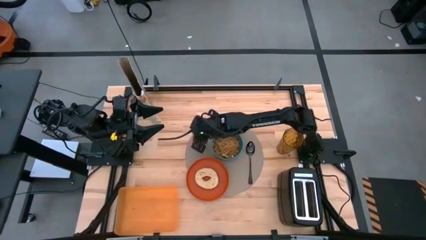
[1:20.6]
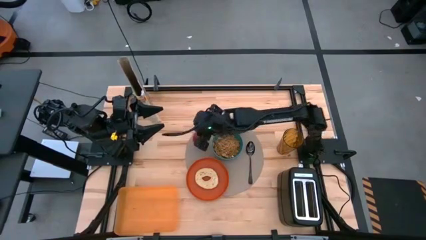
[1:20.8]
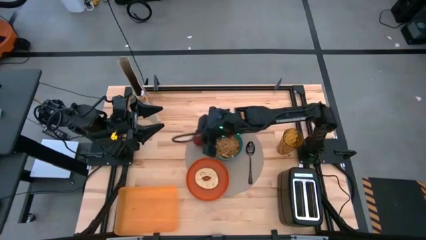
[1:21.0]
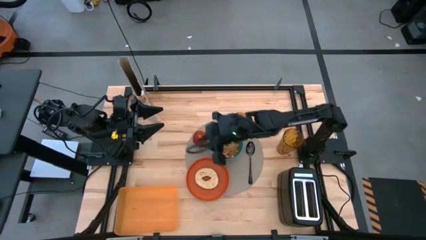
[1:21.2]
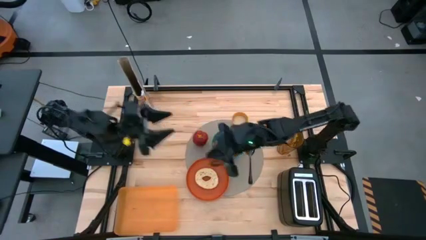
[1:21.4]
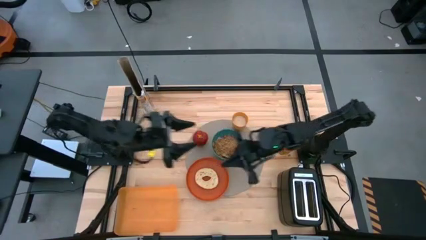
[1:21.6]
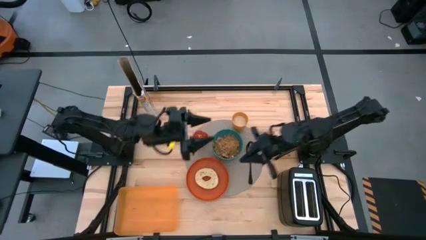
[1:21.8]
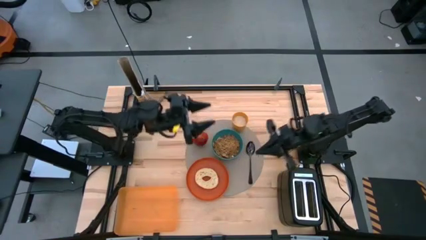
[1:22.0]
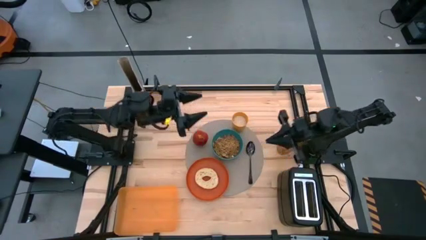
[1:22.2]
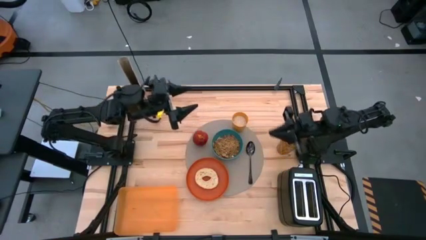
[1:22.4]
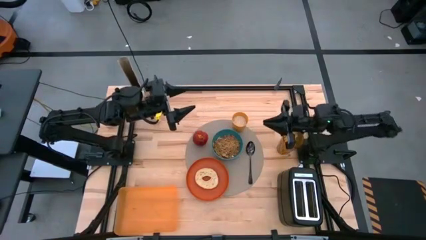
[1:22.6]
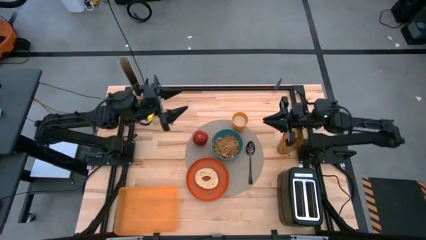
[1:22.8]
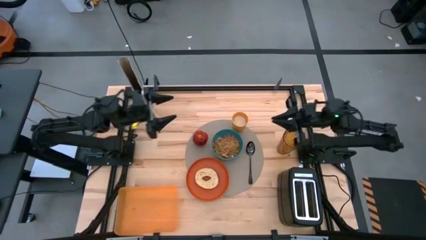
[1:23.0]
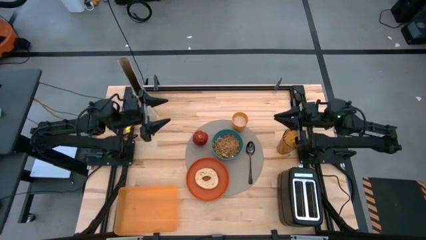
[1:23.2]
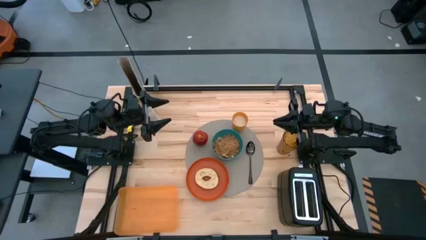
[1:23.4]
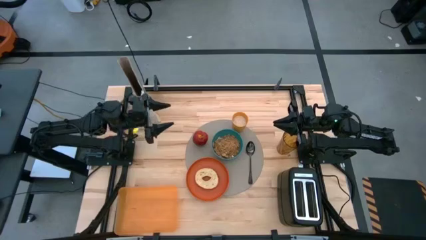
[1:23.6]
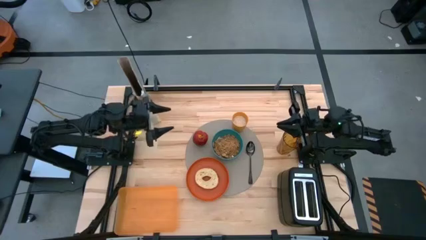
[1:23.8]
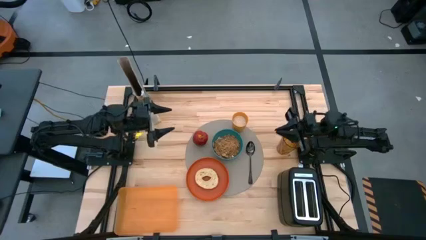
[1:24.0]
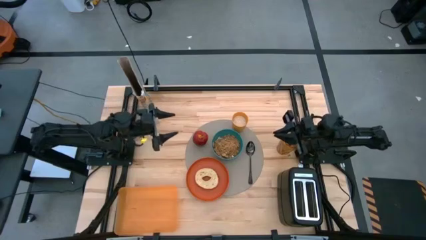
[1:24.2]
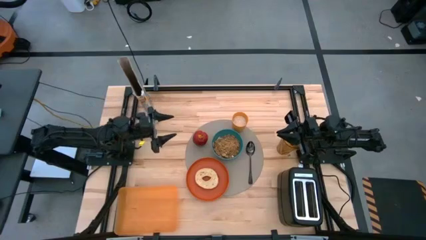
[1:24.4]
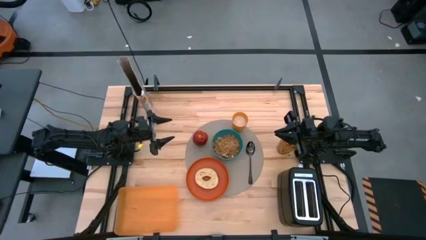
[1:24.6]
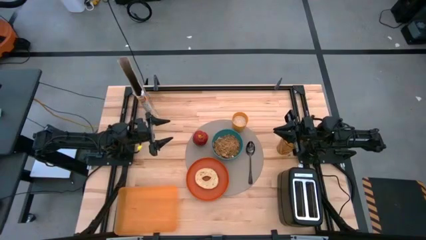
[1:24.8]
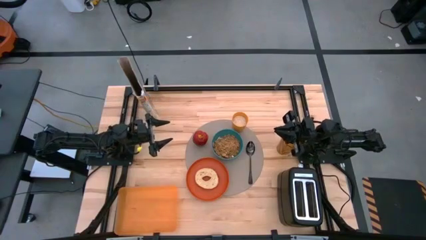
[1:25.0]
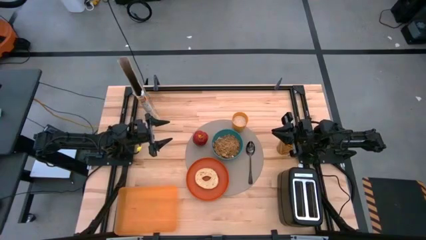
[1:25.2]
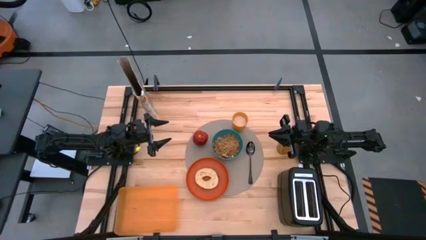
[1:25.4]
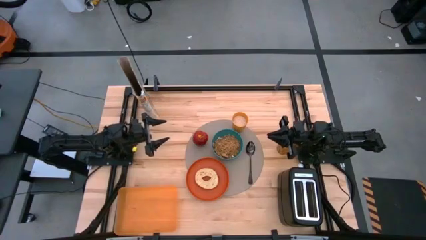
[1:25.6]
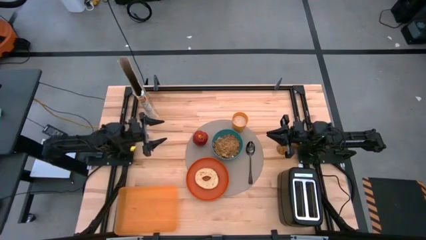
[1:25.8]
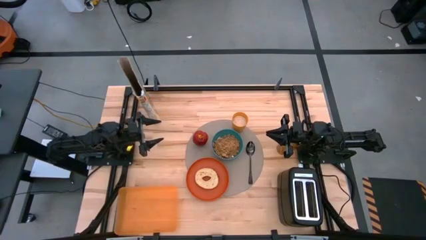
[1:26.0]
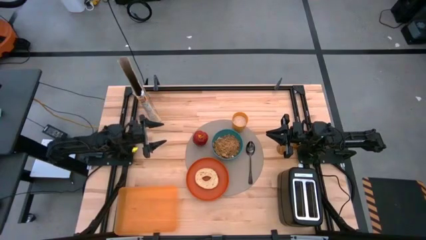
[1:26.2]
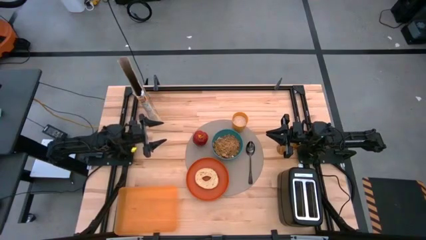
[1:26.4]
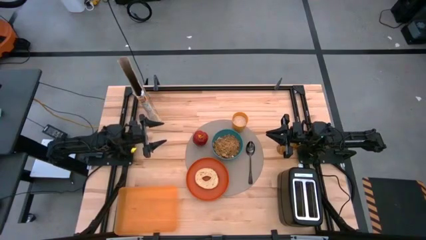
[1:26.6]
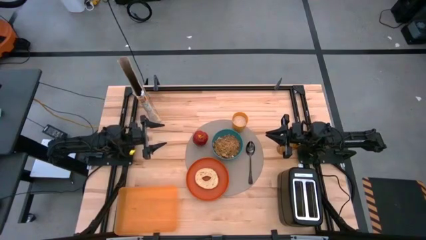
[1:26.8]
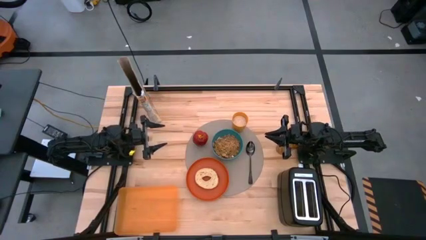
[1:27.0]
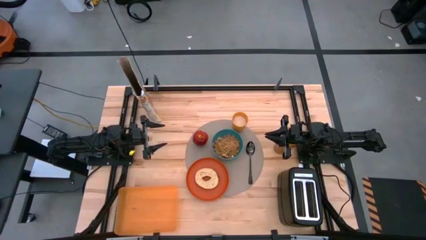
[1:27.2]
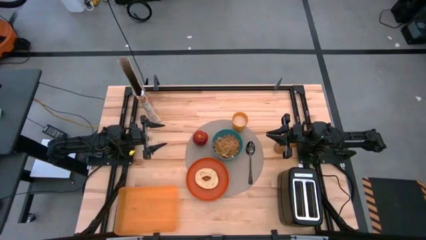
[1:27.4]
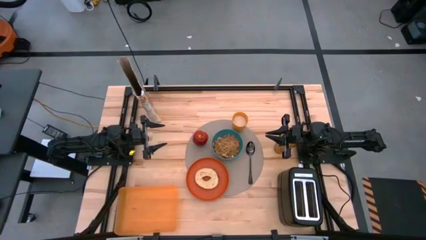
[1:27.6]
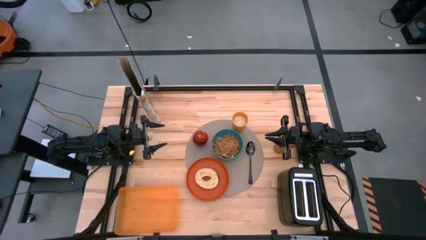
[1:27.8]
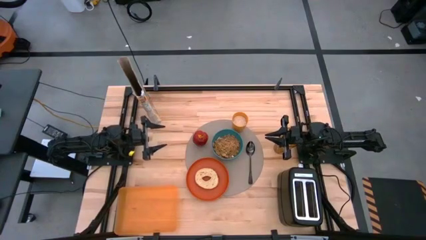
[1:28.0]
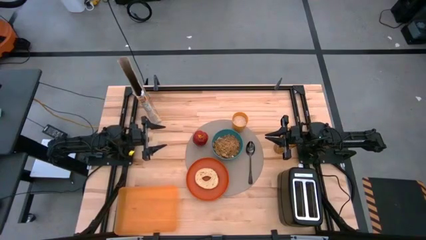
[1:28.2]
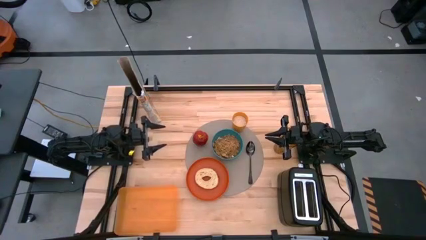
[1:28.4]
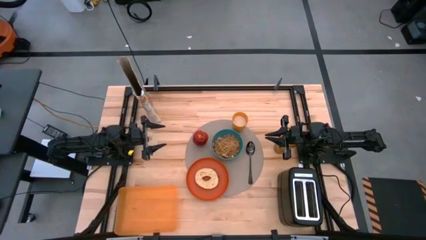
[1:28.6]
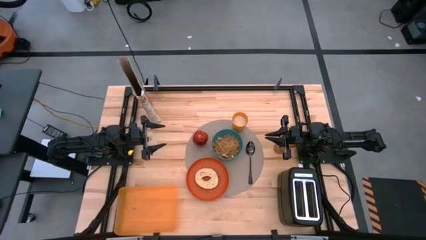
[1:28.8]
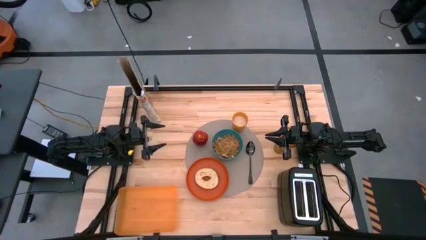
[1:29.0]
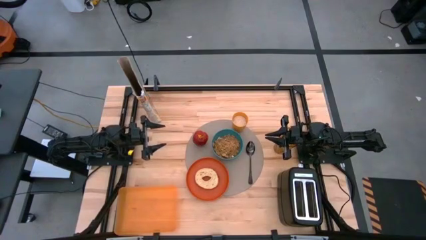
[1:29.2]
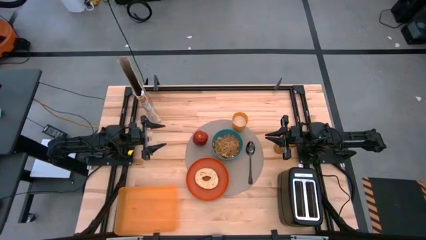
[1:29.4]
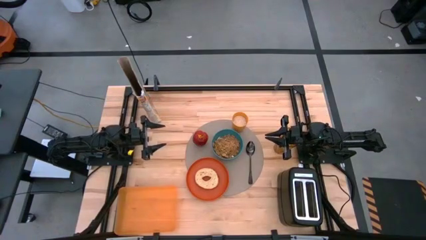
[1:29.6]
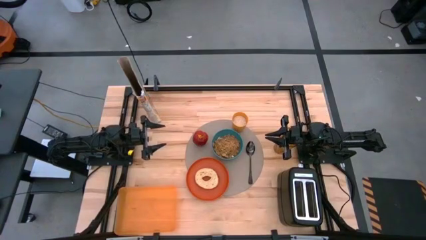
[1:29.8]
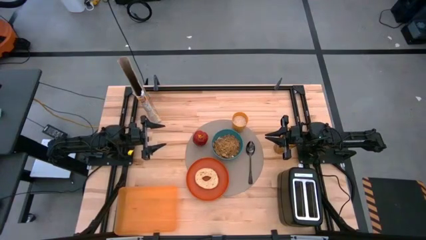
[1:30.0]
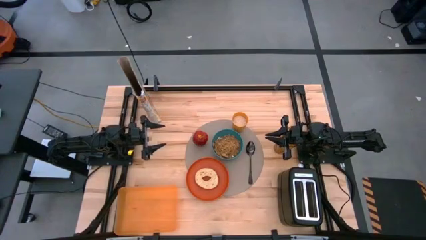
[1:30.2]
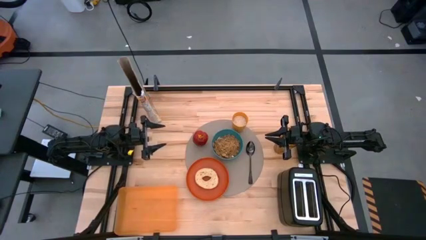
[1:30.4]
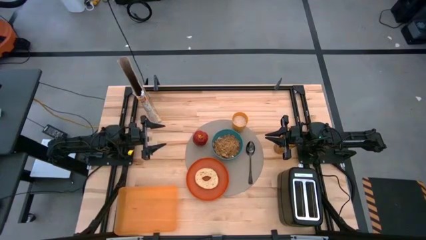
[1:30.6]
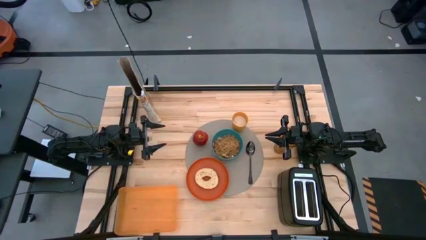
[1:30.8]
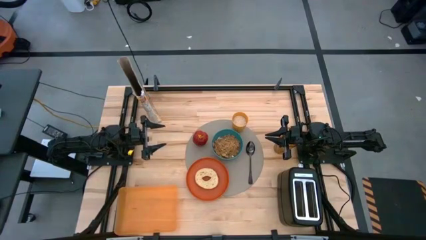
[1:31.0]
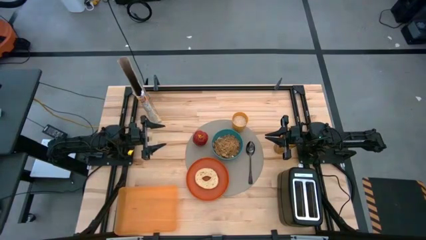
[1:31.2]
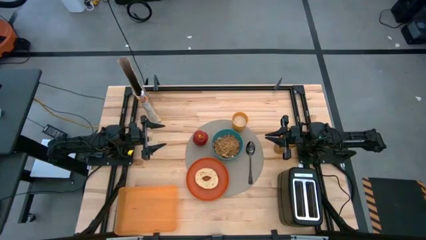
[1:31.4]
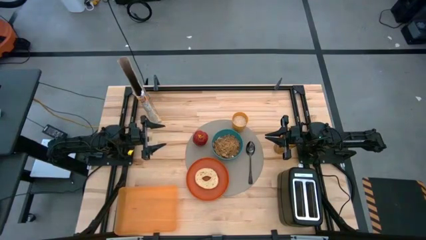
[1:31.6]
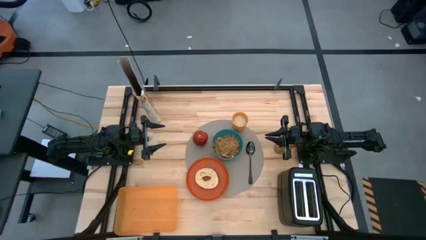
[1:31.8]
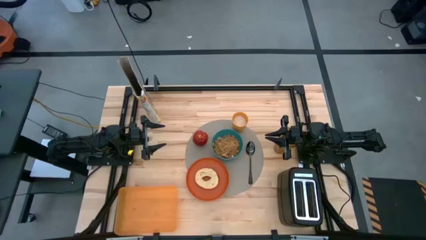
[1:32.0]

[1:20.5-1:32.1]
Task: Arrange a breakfast setting
Return to Home Position

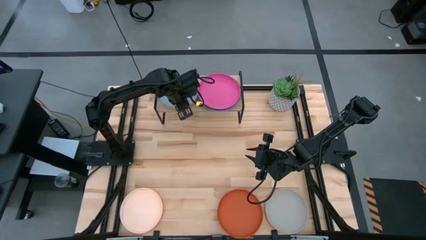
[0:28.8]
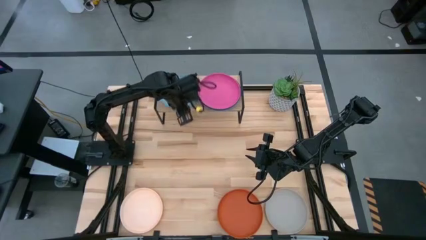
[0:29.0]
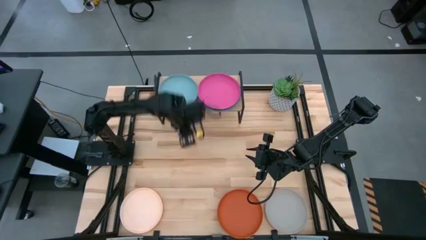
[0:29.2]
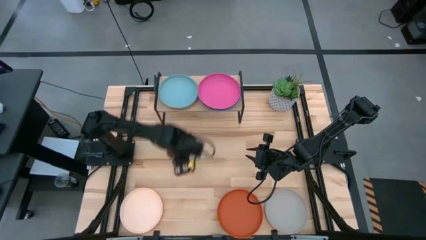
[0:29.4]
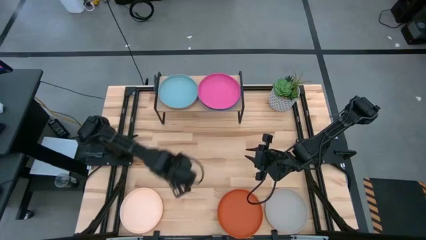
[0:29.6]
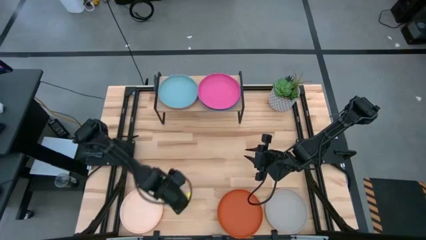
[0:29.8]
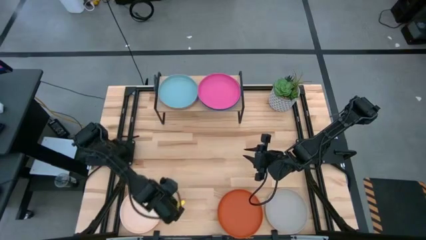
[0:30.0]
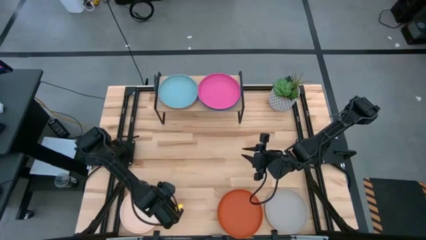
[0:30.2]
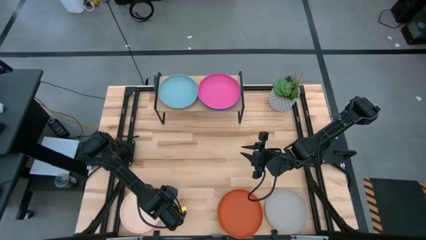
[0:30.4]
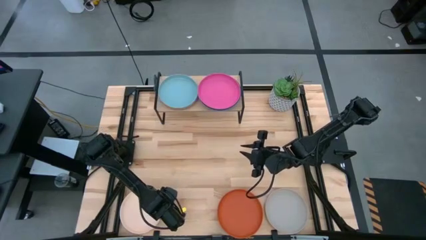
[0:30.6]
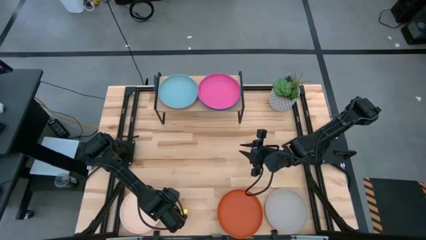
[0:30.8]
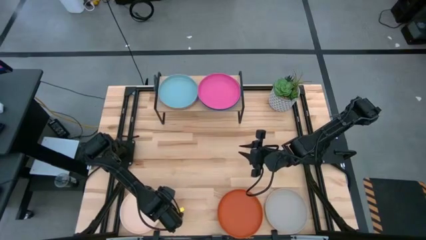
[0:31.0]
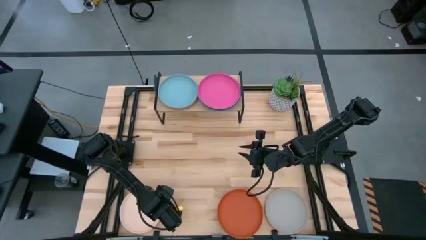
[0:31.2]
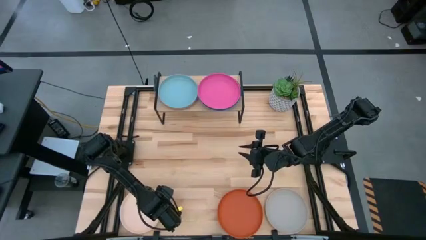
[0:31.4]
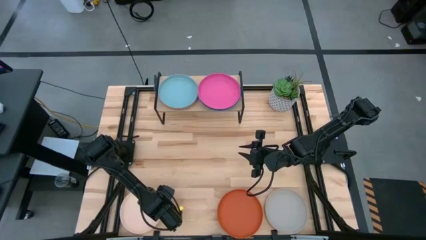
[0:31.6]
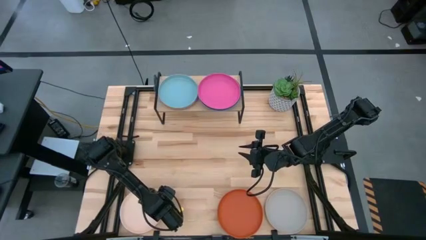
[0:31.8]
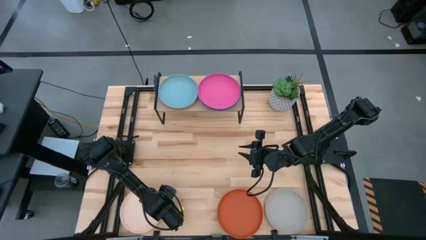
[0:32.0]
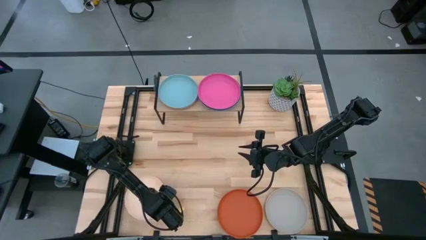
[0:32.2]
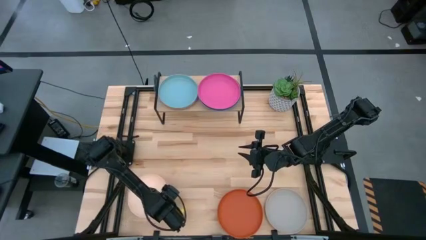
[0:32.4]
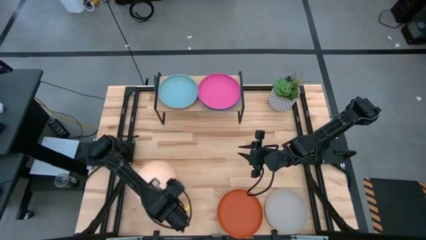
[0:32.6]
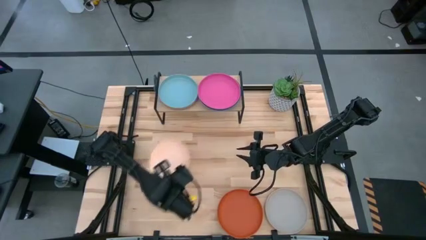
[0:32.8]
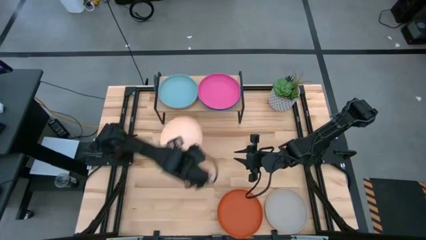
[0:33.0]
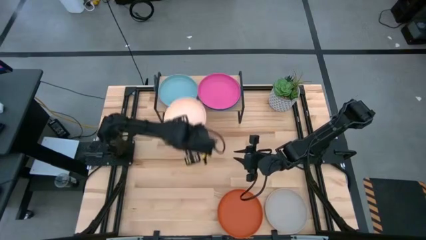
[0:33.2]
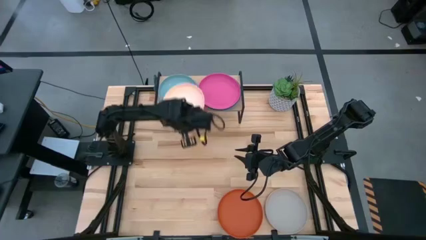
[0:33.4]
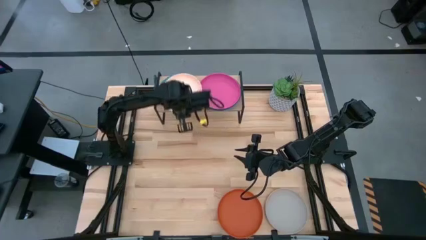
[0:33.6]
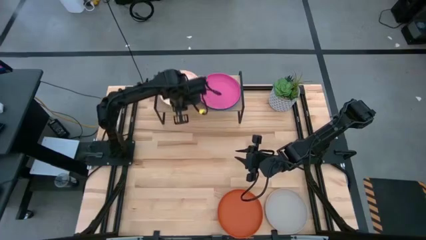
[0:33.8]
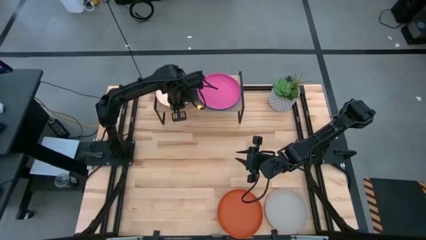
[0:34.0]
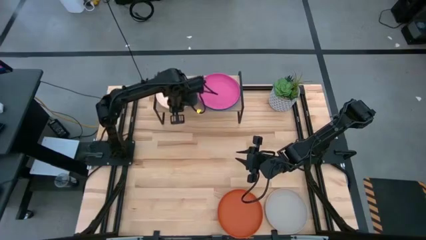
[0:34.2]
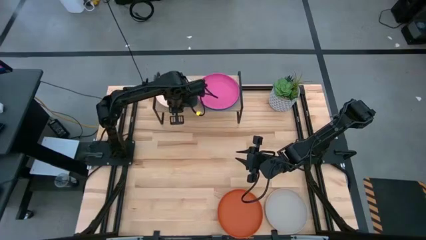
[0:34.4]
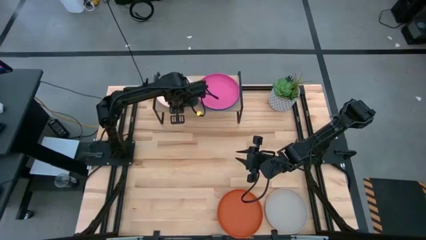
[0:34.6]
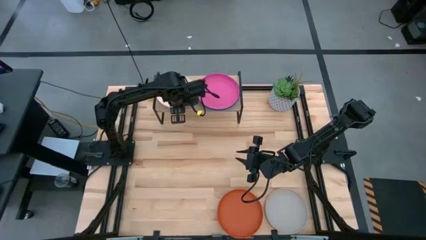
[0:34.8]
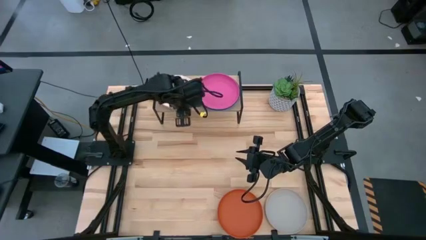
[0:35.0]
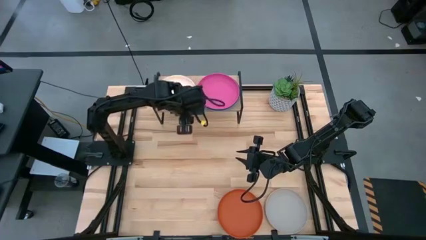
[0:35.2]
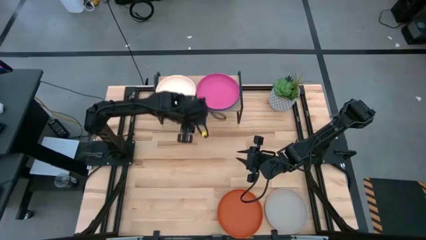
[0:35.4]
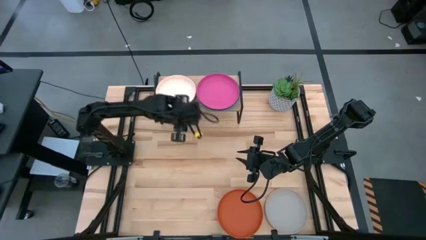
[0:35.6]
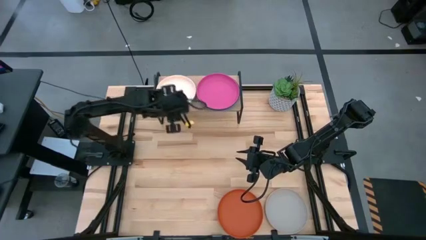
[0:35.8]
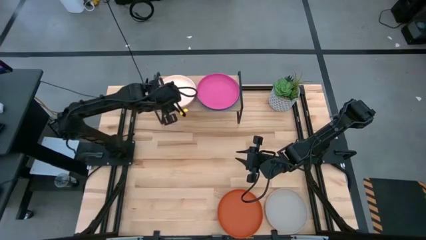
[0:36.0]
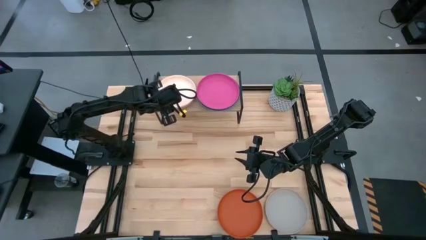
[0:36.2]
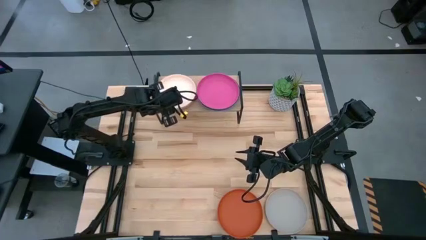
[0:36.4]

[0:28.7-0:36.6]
Task: Place and stack plates onto a shelf
Stack the light orange plate on top of the light blue plate on the shelf
